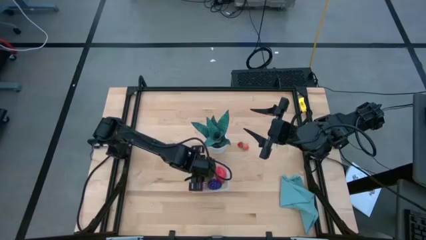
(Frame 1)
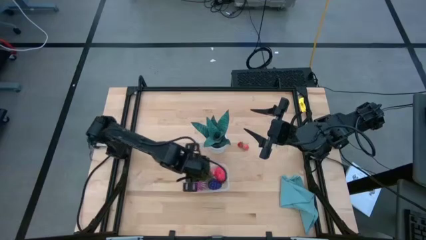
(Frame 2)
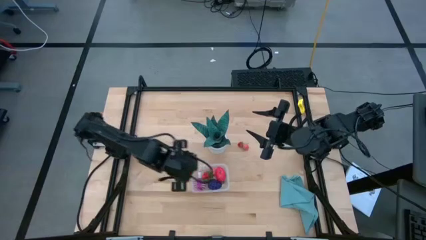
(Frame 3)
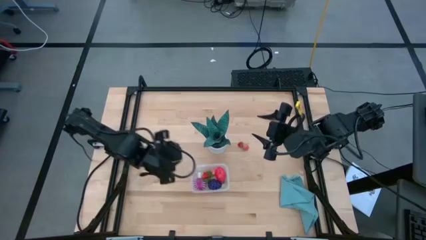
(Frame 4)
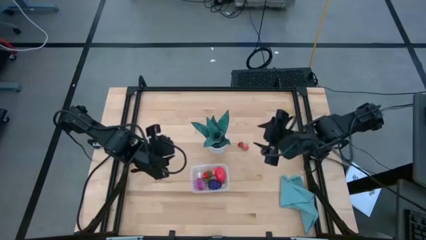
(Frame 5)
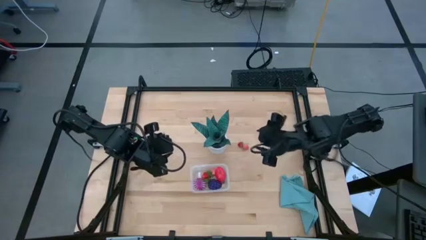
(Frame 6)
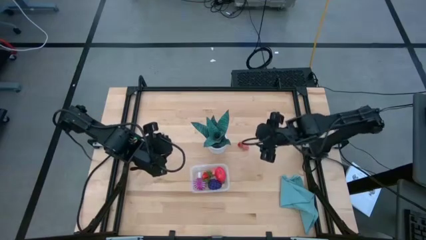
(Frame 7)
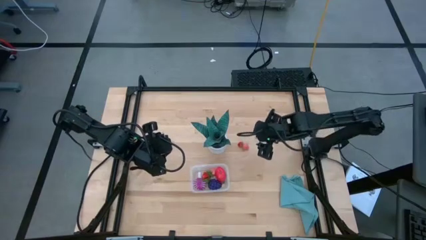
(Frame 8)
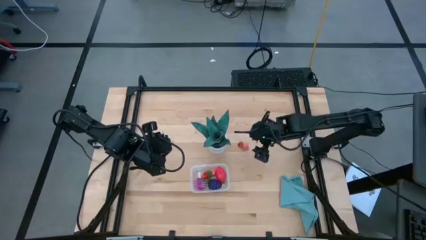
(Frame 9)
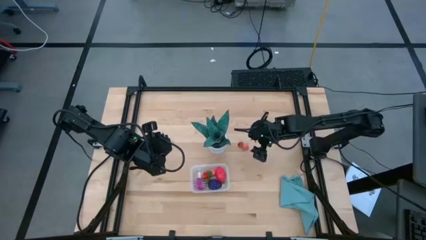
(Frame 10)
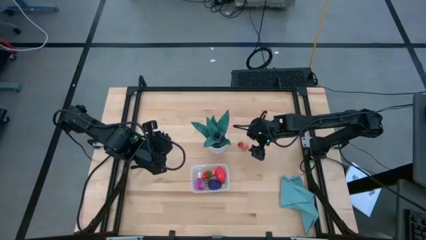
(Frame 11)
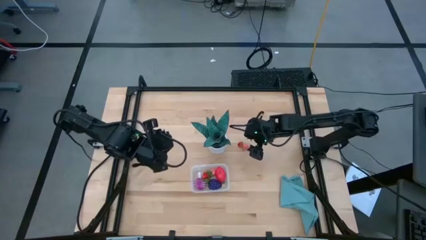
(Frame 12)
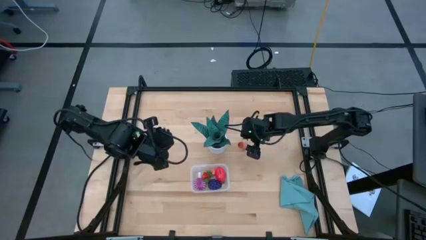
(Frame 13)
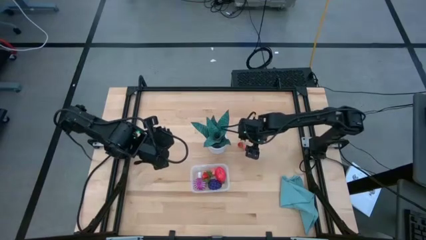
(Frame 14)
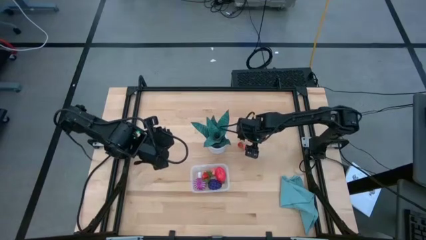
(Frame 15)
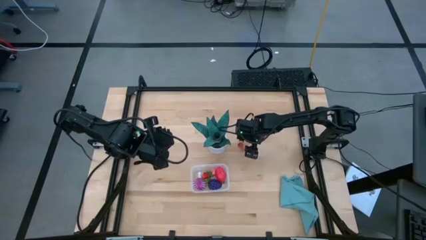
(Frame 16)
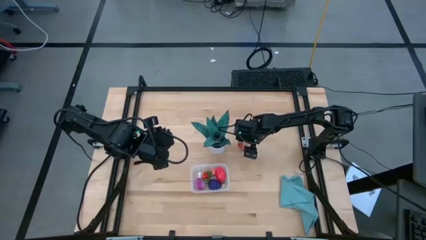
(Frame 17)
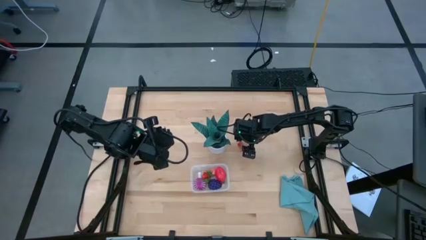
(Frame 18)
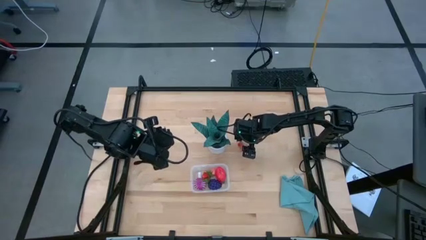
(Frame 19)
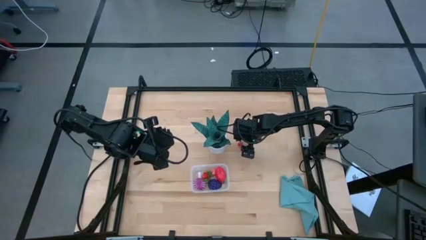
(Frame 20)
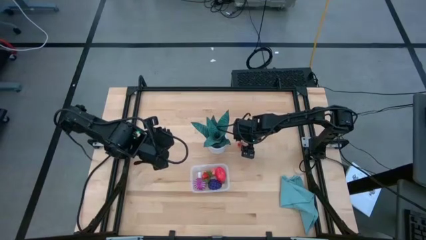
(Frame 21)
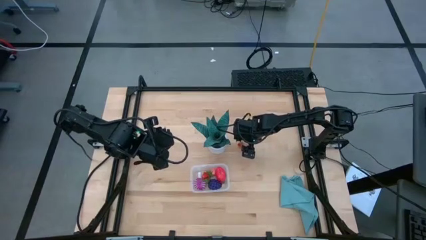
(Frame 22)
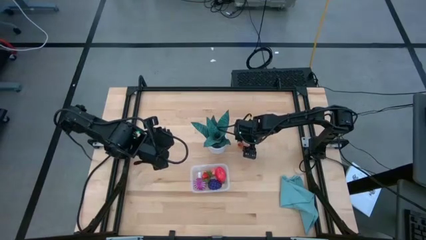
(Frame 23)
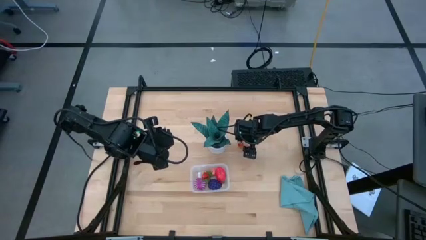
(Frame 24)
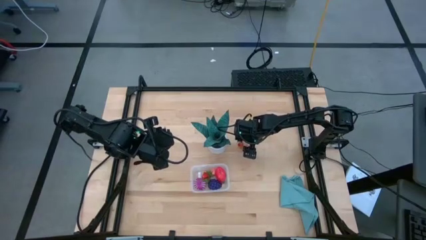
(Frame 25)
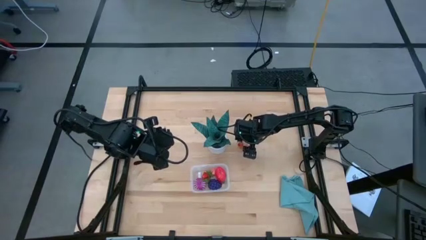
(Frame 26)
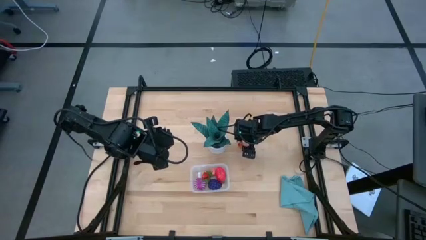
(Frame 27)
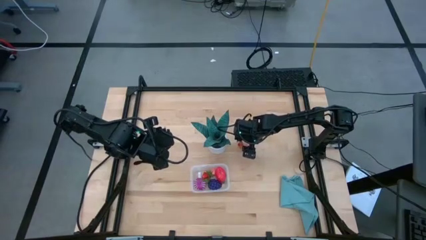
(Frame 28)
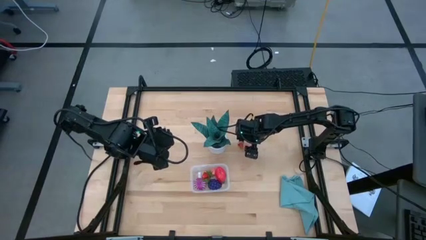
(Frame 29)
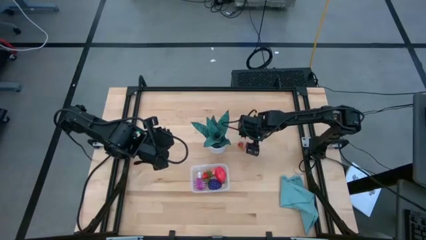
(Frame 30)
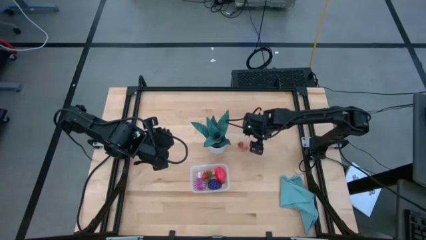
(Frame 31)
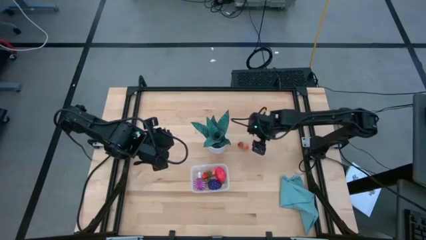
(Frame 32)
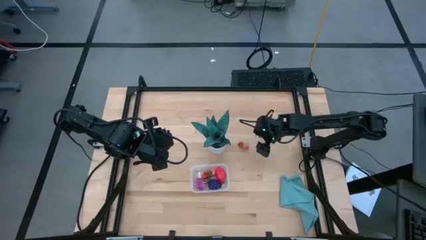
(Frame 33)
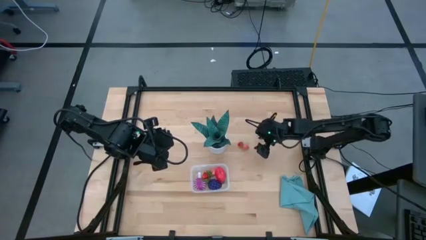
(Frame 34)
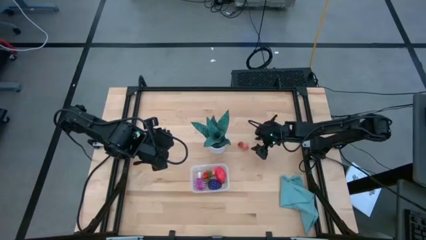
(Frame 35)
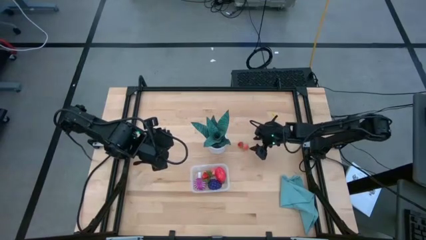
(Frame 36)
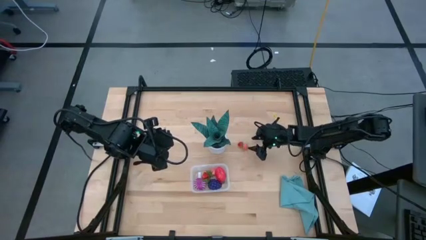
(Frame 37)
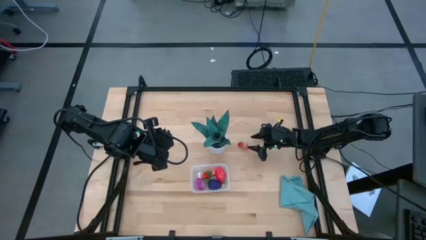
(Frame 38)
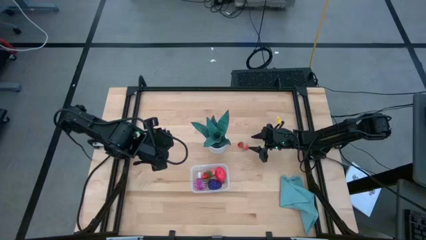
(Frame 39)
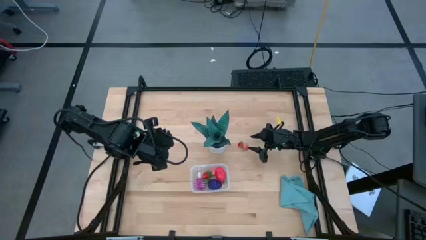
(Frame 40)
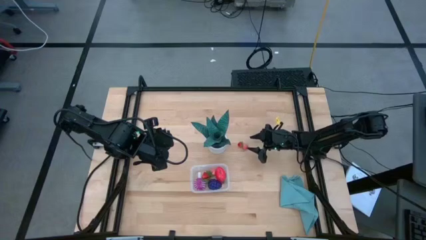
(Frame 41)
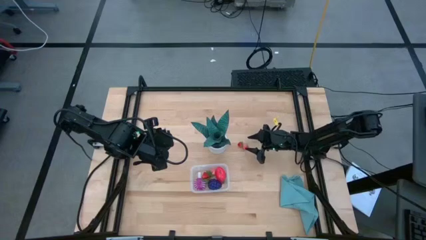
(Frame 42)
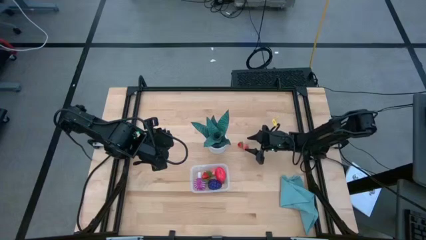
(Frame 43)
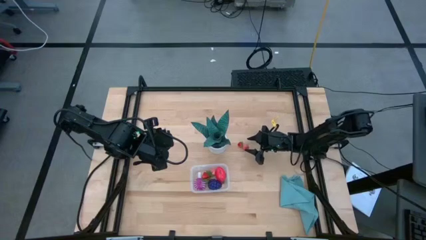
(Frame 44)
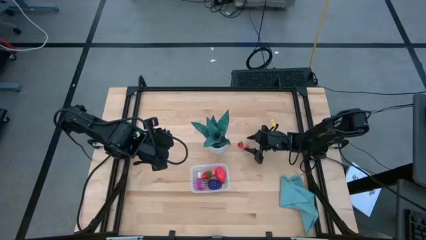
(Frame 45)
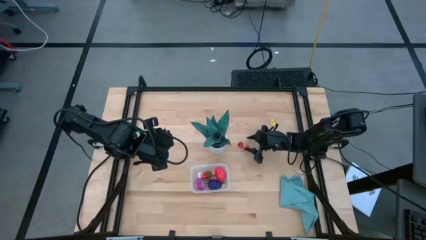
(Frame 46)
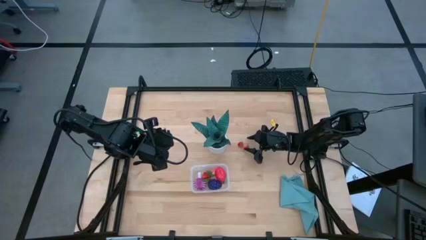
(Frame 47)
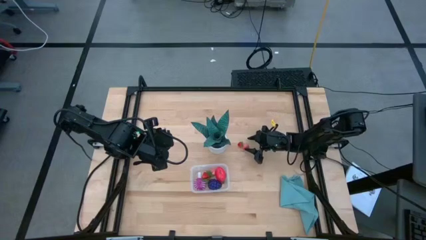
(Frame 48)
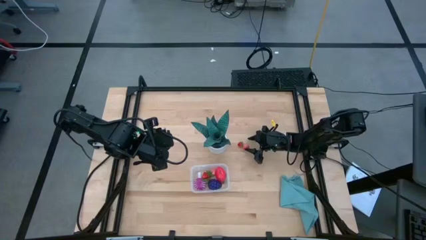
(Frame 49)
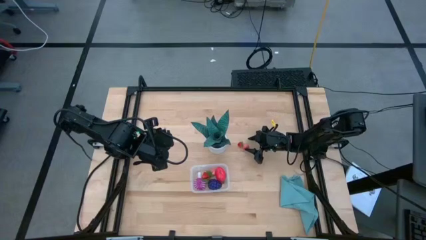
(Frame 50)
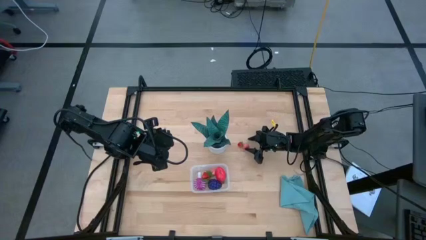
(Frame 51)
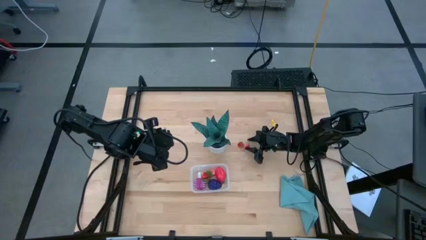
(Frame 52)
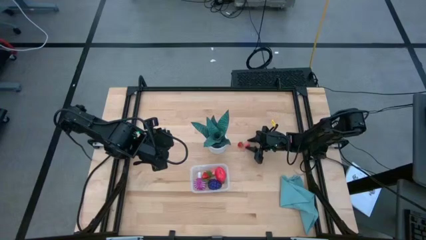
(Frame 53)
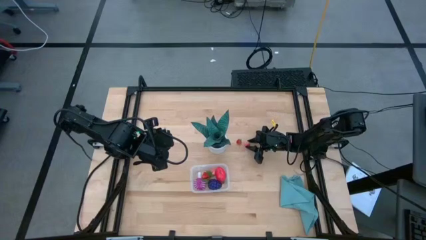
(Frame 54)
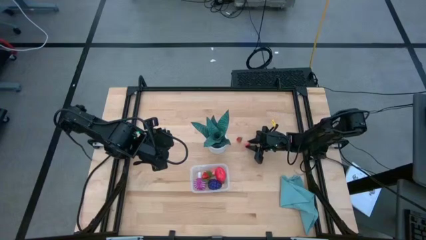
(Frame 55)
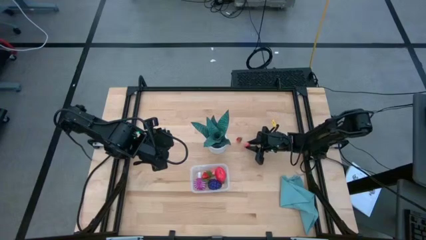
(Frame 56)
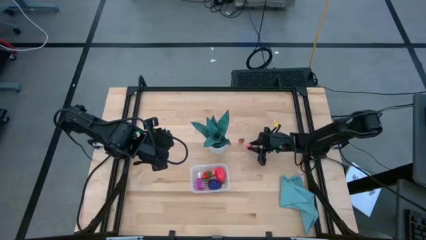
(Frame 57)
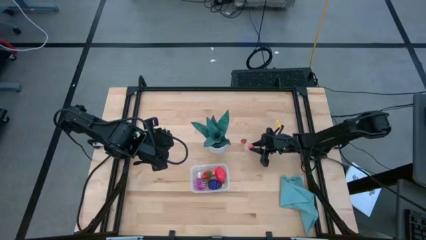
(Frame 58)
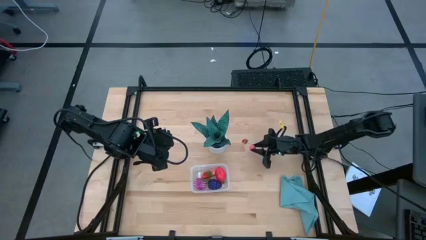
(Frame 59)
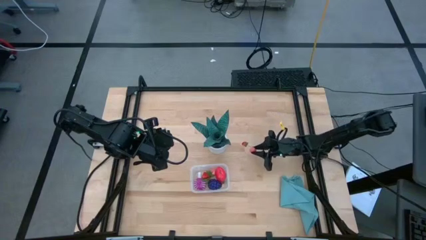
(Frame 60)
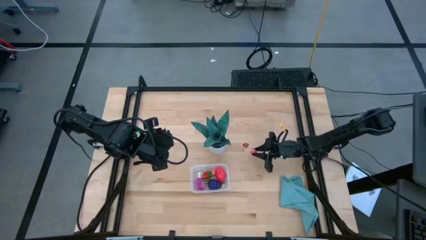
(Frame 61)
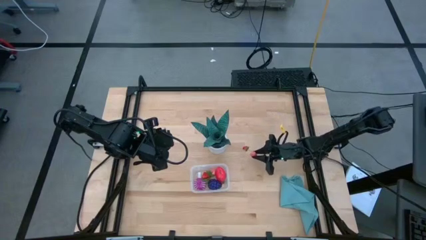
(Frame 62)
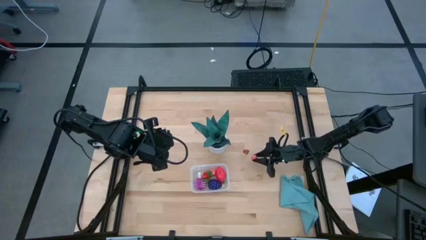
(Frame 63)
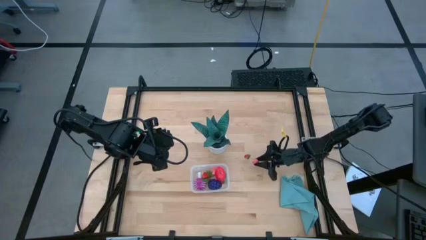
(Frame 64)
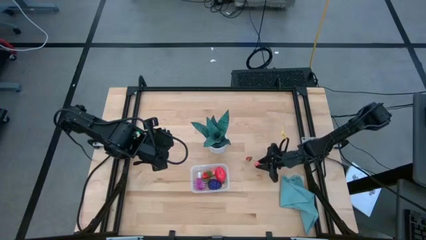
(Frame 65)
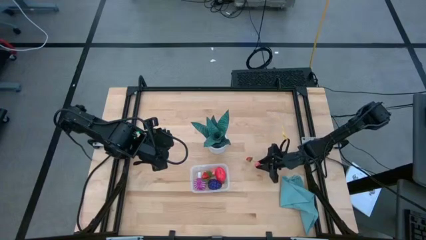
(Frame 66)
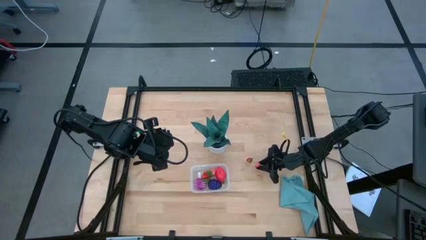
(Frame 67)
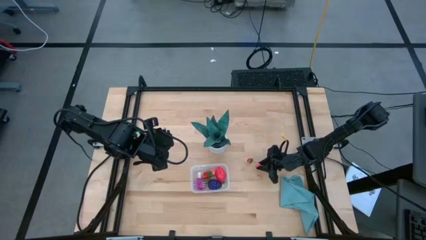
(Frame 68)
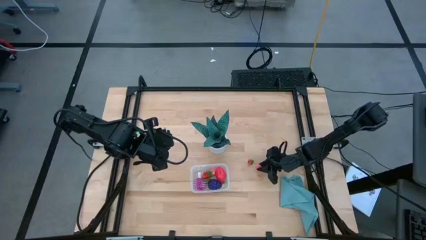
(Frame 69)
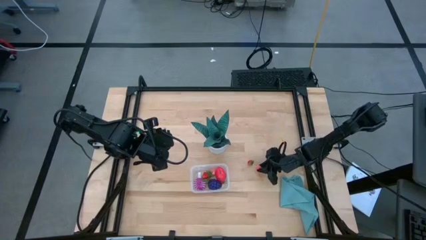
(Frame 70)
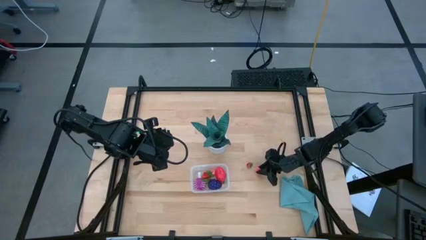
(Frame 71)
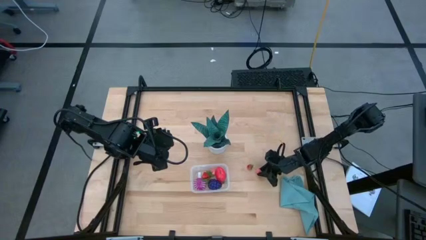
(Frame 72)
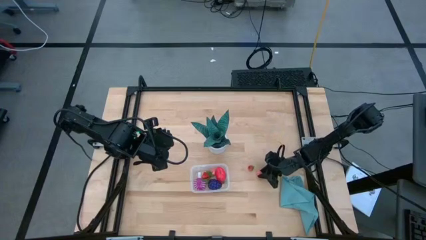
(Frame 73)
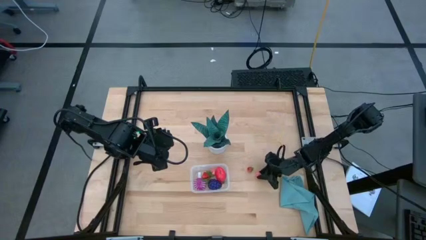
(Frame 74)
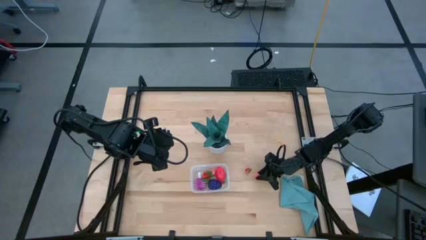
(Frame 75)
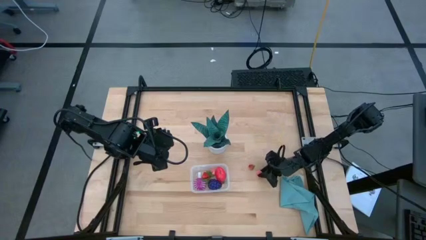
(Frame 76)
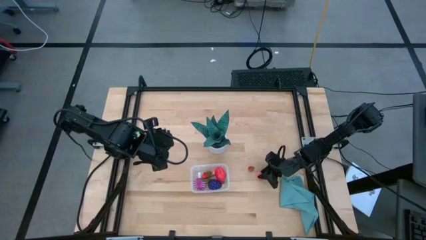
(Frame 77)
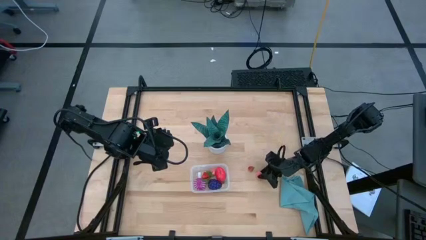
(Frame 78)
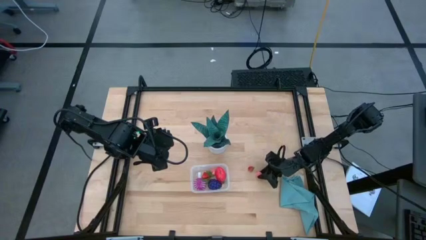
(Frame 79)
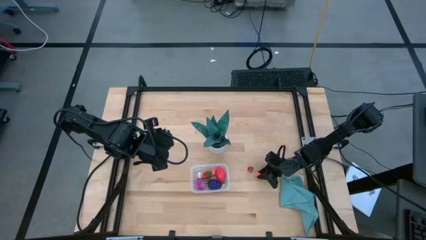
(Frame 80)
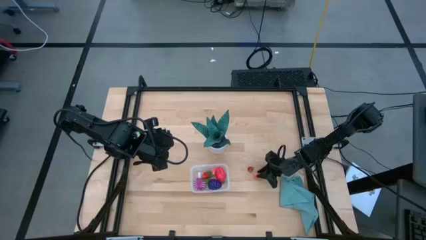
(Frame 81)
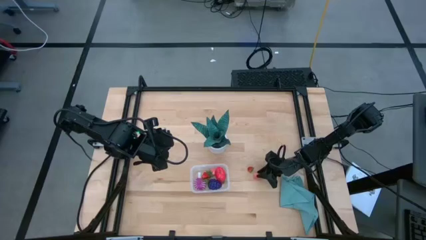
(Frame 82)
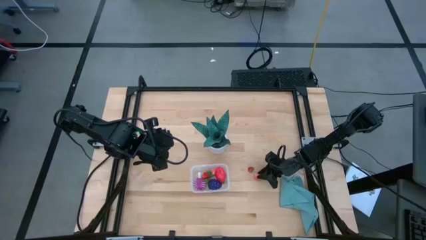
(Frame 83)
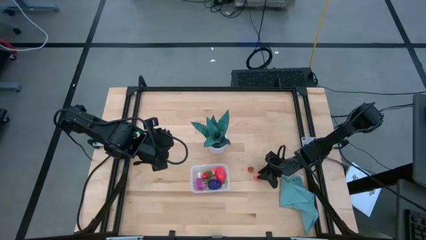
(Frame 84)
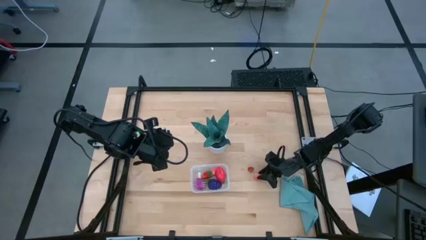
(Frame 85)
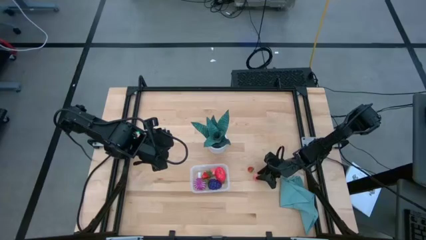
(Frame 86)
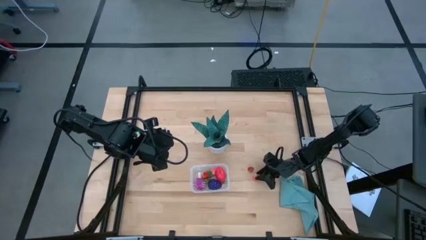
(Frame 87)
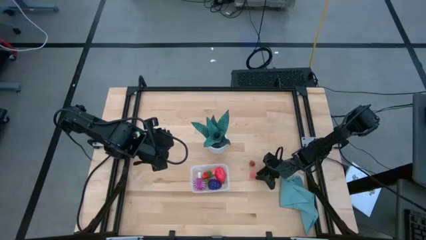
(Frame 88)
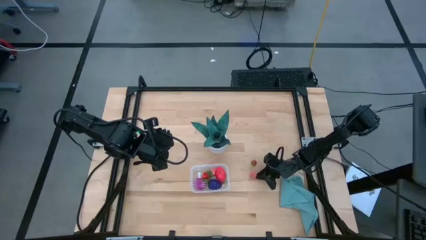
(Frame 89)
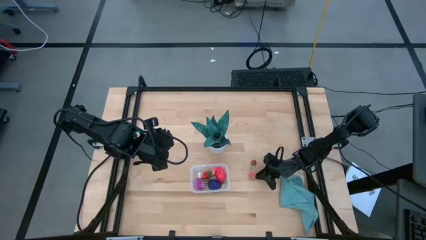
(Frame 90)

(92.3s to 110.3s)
Task: Pick and placing Produce into tupperware
Put the pink peach into the transparent bin
